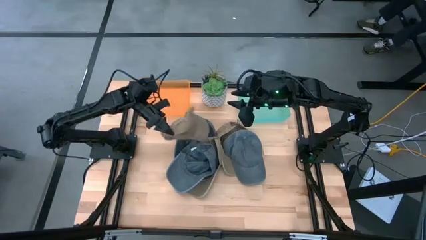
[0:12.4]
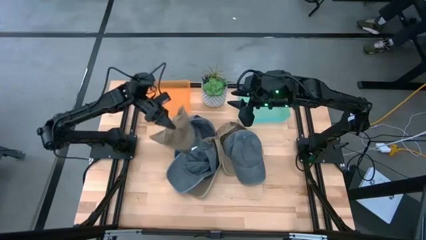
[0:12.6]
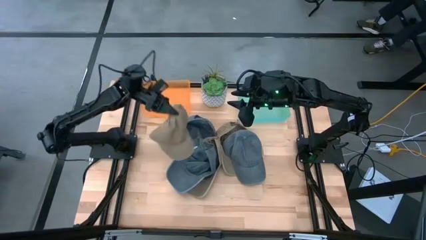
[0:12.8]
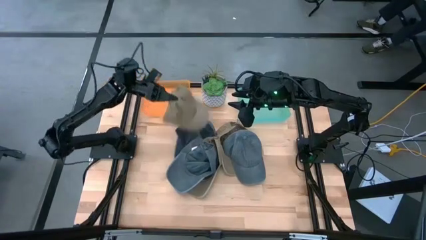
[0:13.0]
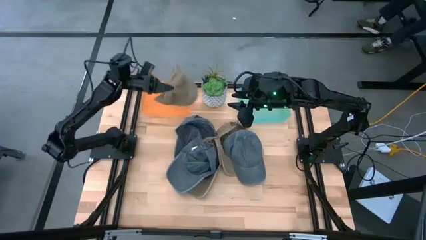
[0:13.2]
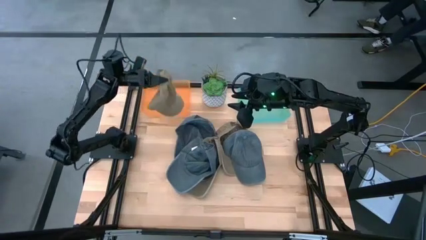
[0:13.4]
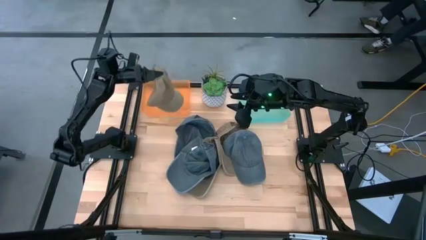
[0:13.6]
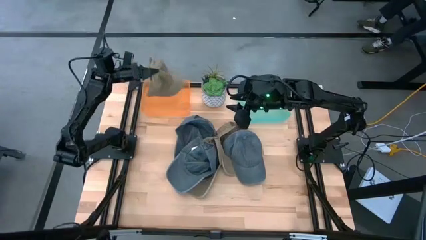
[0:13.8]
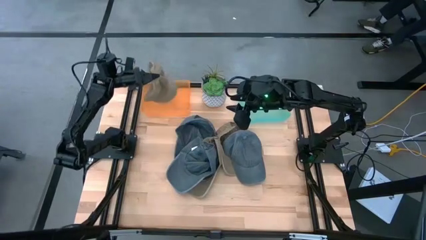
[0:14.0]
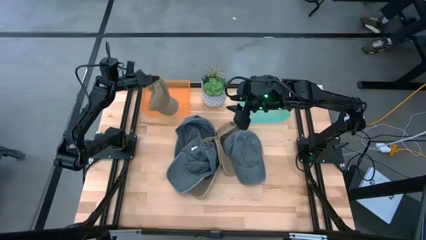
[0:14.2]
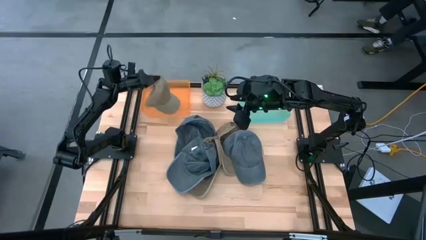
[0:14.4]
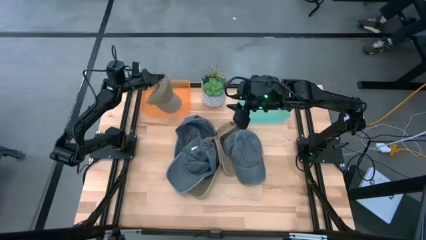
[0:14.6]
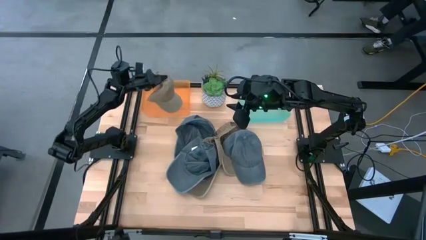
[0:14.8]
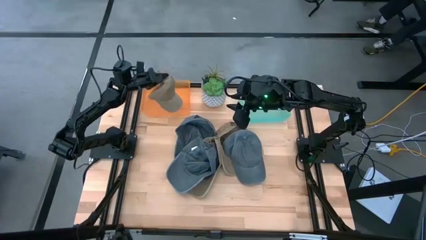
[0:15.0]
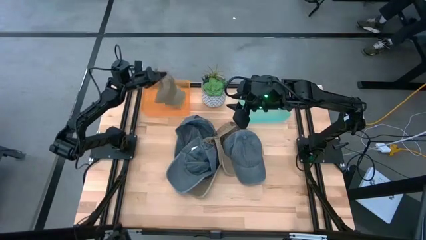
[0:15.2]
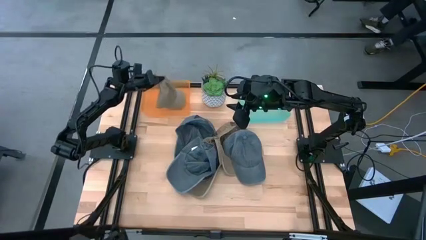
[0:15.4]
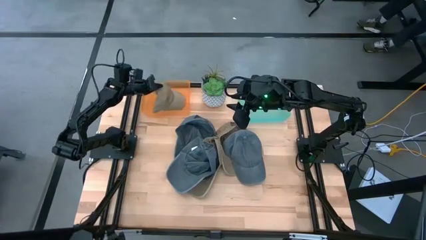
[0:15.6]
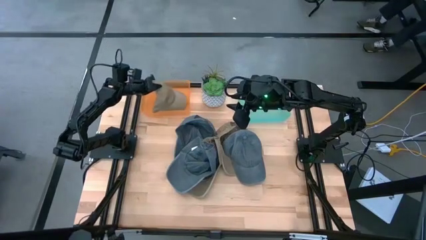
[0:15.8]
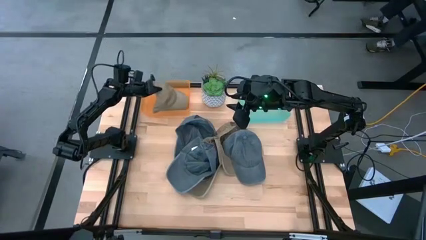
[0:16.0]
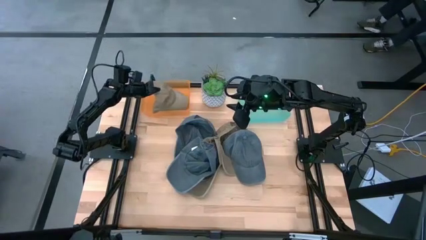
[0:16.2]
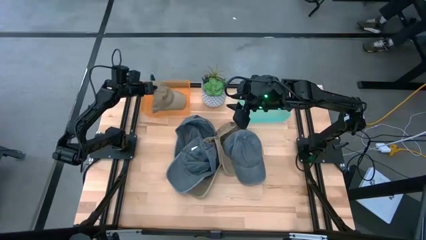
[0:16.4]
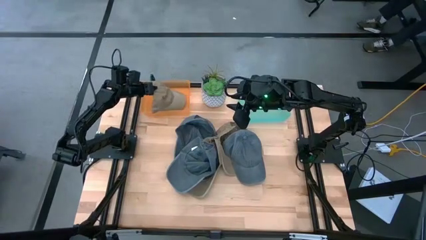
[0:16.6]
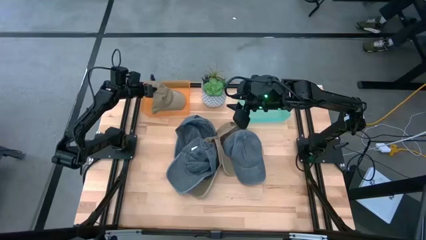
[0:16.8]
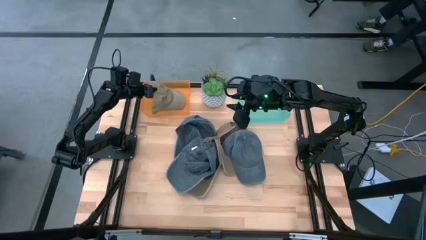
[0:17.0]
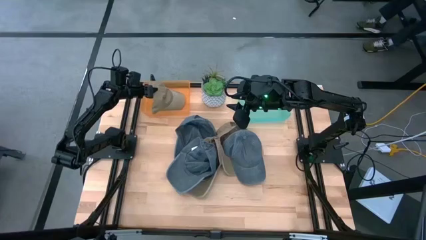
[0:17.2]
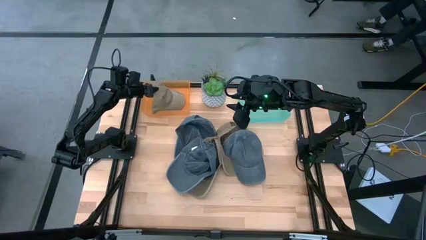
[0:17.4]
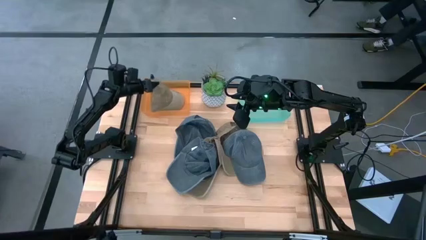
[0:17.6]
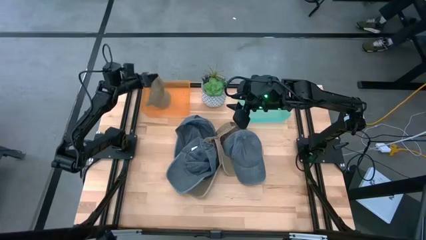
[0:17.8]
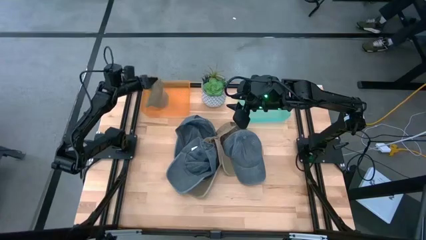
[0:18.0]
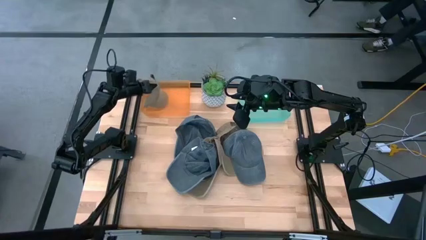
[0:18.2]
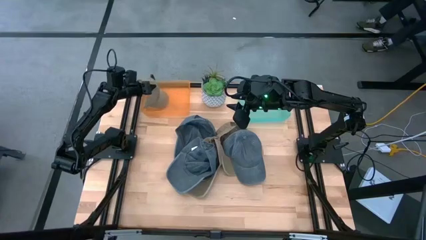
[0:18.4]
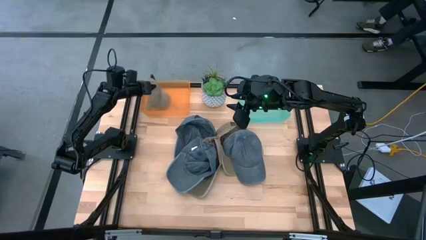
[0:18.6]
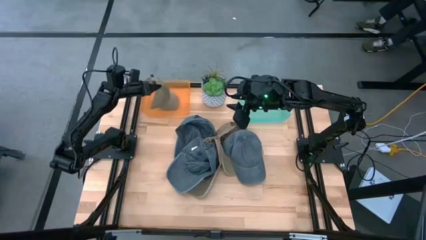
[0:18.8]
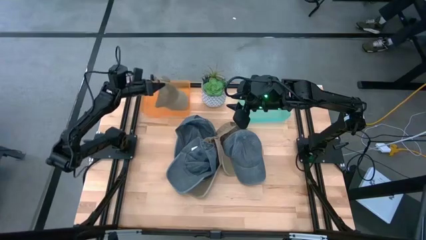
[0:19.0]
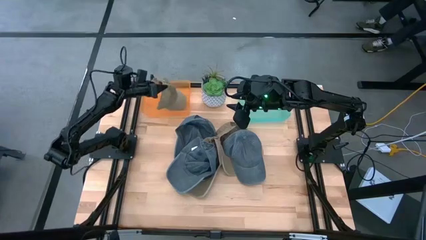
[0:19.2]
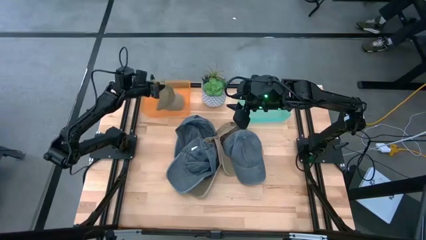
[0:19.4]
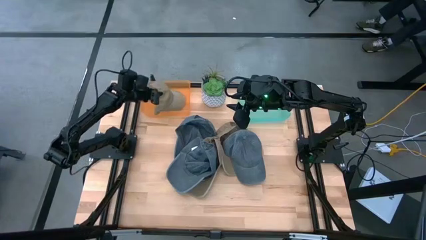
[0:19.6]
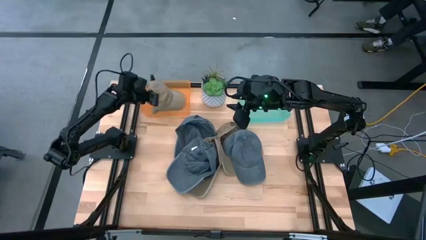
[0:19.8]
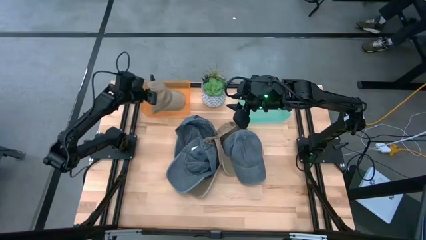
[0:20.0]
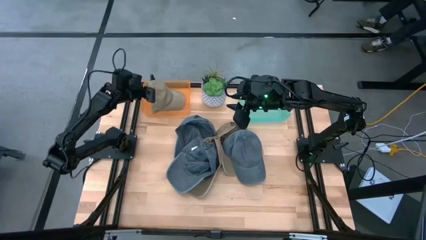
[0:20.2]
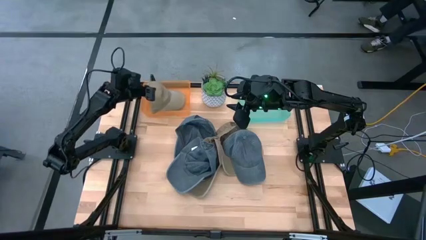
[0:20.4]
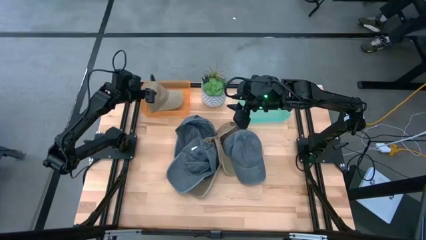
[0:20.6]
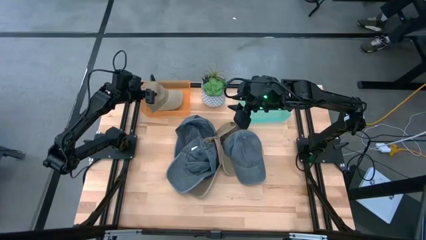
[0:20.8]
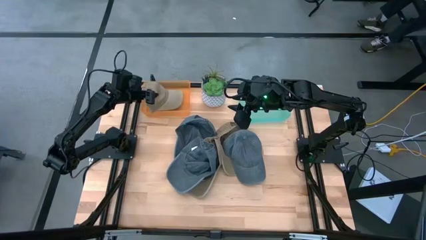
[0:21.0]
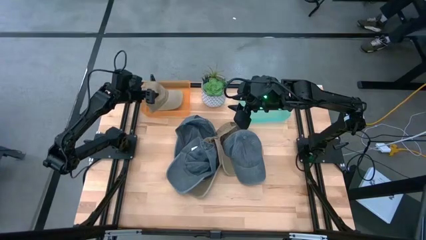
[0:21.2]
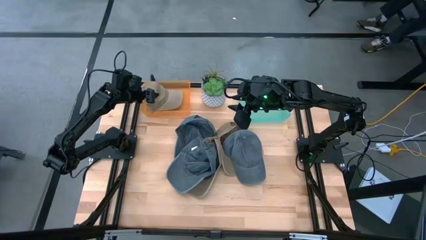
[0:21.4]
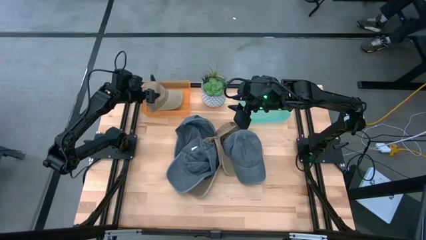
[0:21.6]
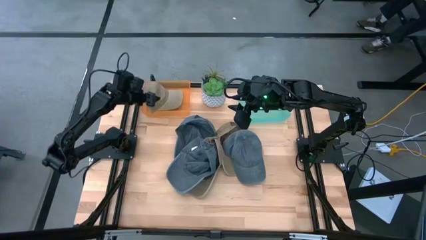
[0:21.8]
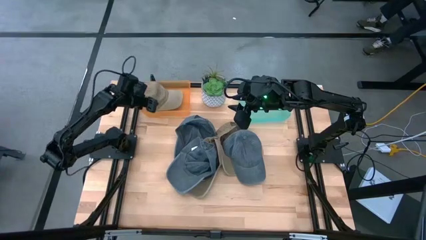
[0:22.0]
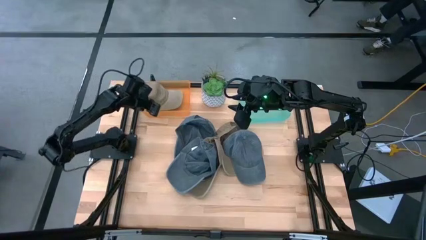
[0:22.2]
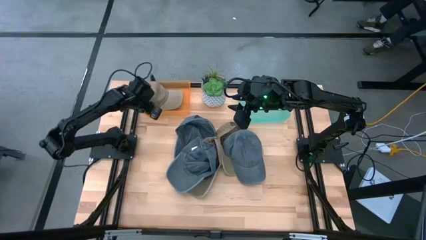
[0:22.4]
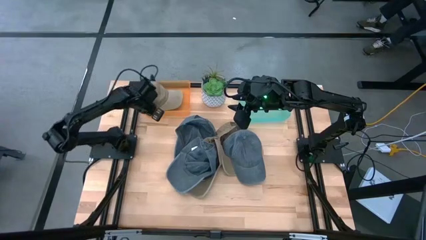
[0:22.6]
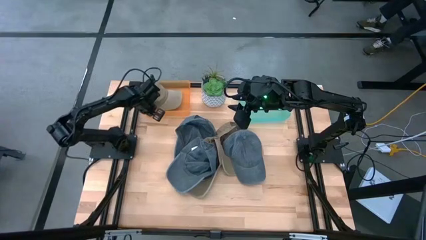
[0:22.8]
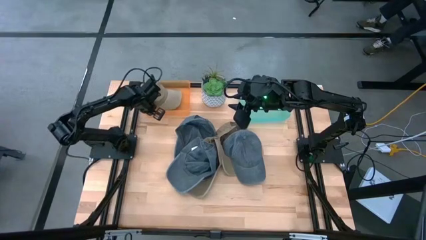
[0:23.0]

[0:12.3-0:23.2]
Task: Pick & Place hat
Put the right brown cap into the orange bin

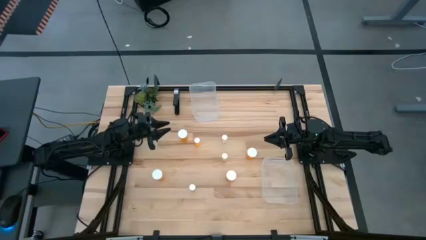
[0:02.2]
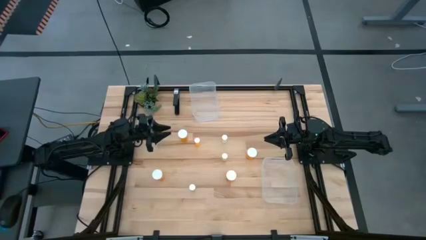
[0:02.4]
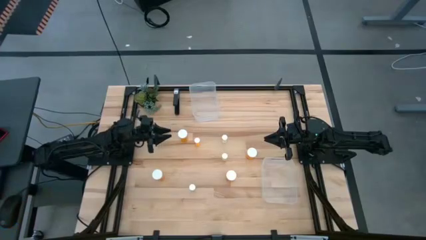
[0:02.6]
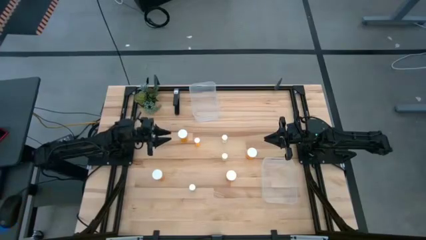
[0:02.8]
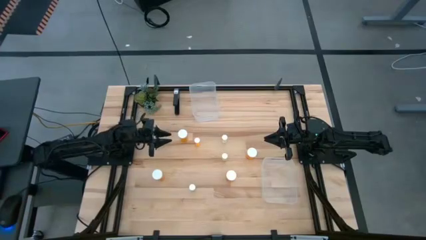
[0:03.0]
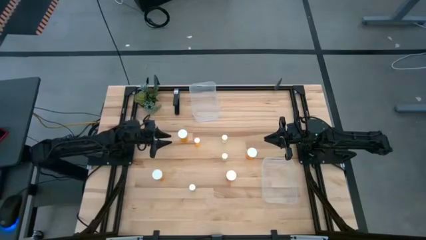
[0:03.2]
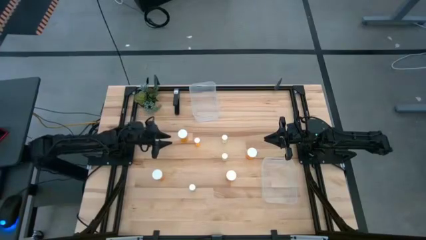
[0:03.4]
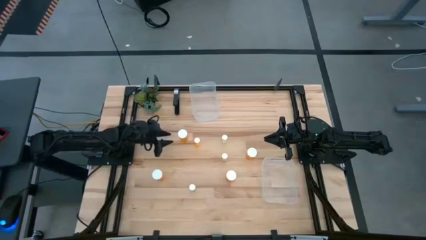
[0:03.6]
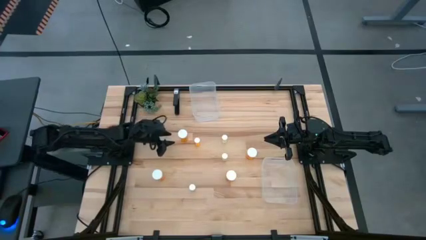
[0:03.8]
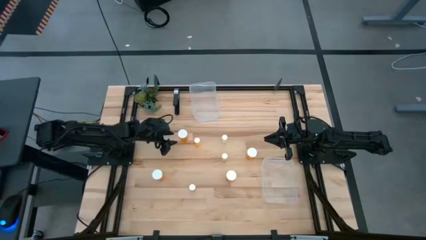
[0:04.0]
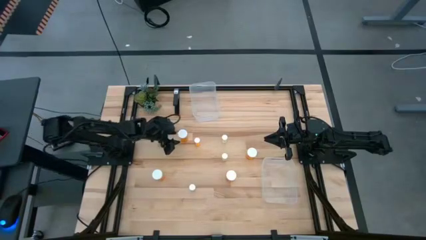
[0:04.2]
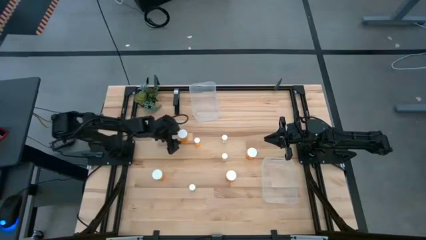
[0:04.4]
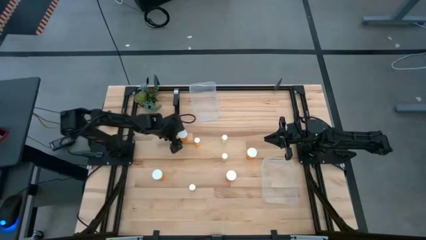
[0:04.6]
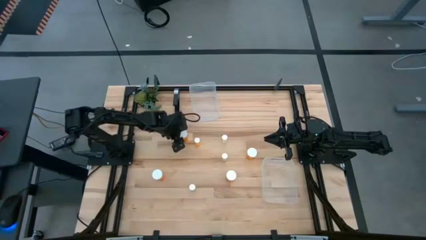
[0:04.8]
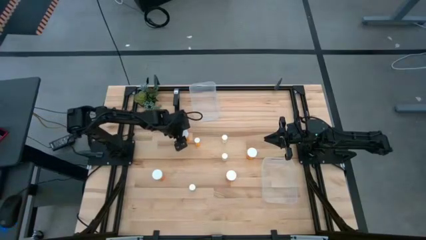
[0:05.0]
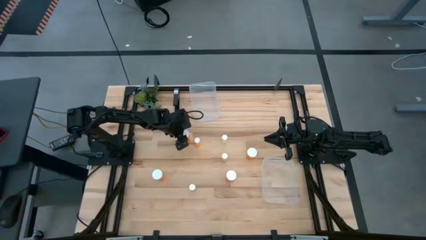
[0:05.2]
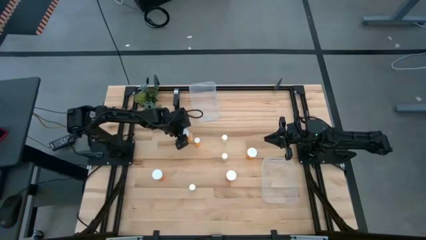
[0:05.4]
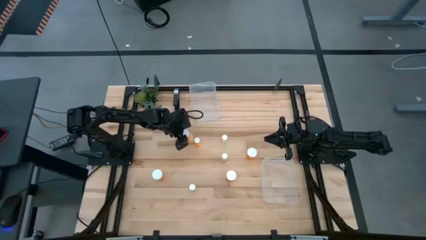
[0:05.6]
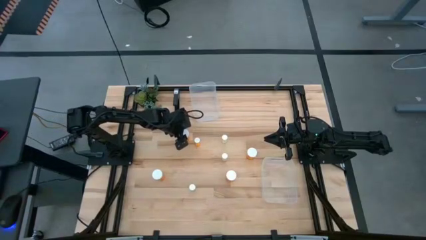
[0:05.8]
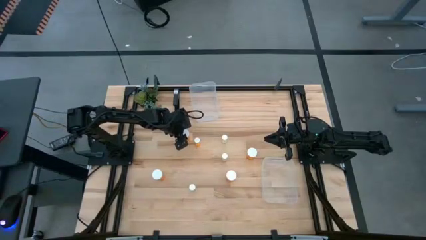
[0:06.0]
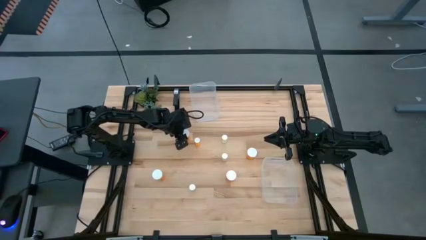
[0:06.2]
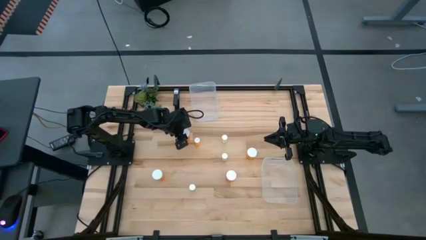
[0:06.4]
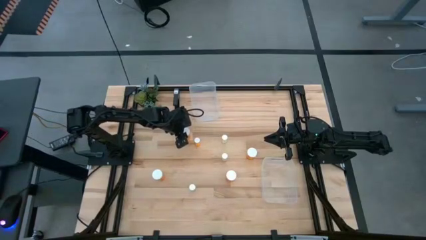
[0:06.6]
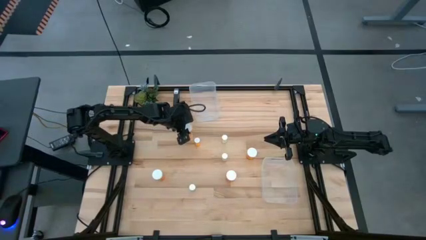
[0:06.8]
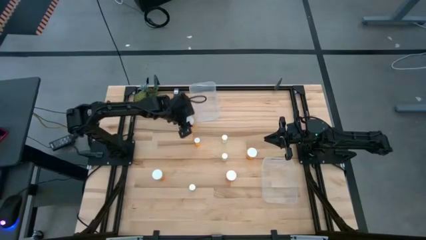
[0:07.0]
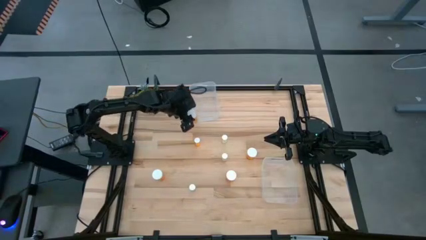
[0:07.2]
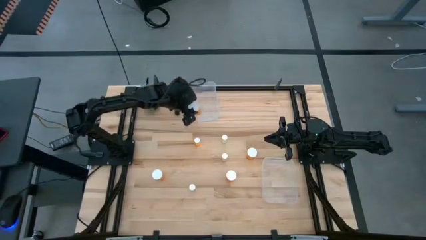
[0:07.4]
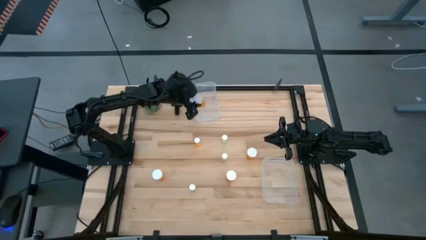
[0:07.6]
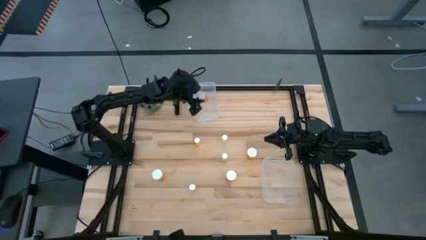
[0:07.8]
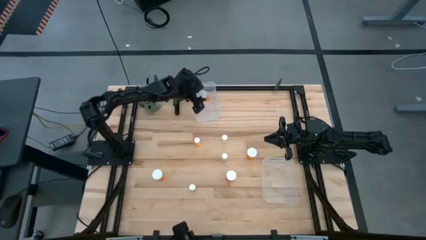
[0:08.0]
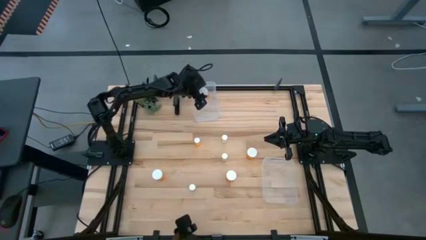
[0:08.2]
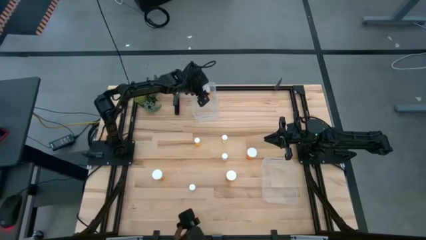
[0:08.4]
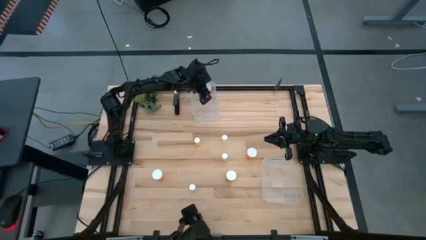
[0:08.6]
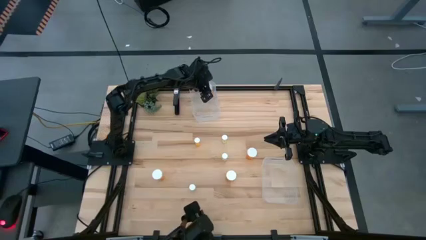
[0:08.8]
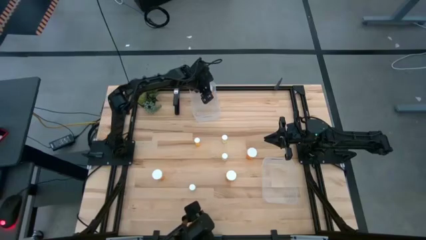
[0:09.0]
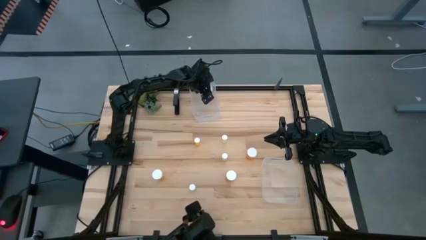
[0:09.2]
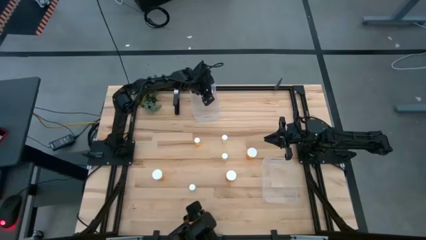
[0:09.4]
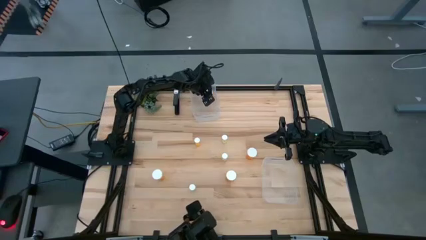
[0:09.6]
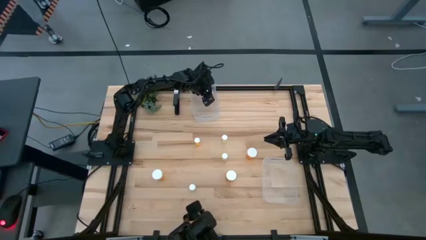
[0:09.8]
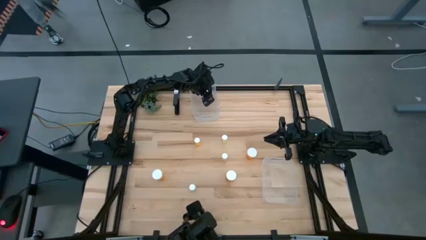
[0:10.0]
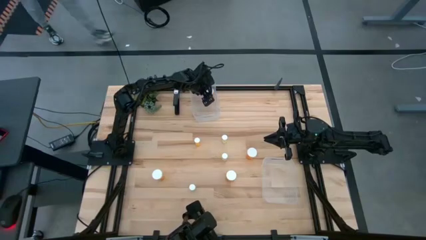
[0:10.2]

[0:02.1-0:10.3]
Task: Pick and place medicine bottles into bin by pill shape (circle, oval)
Put the orange capsule bottle into the top transparent bin
